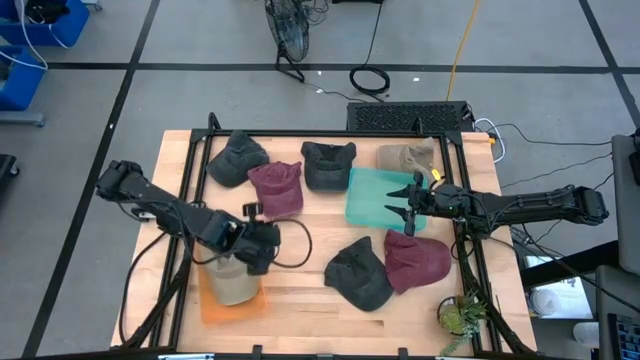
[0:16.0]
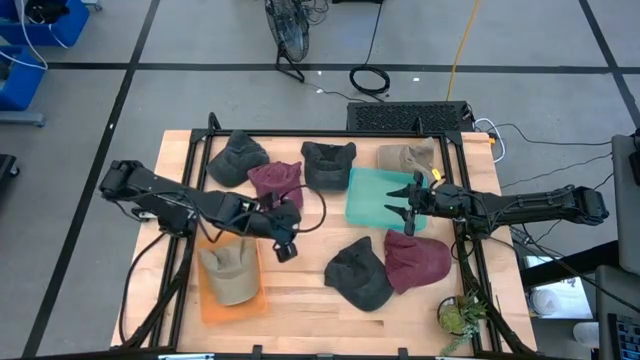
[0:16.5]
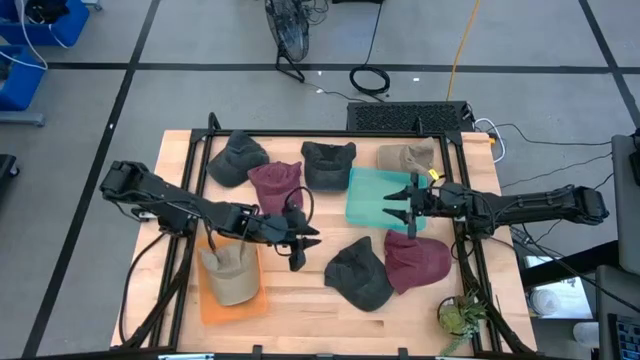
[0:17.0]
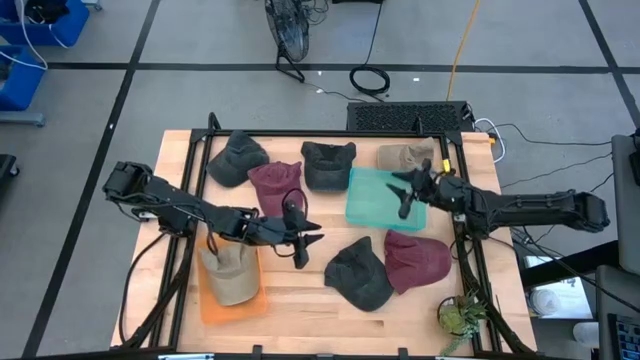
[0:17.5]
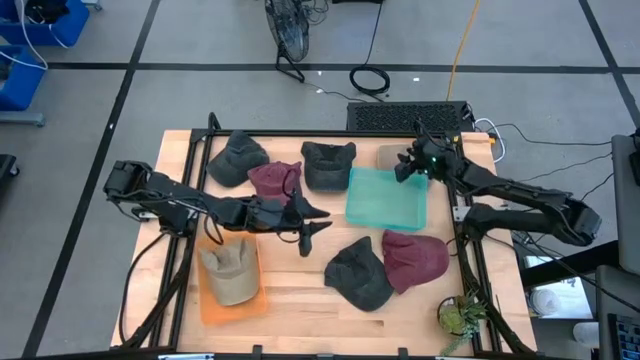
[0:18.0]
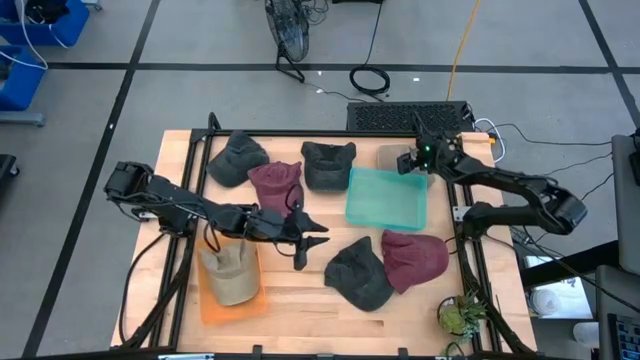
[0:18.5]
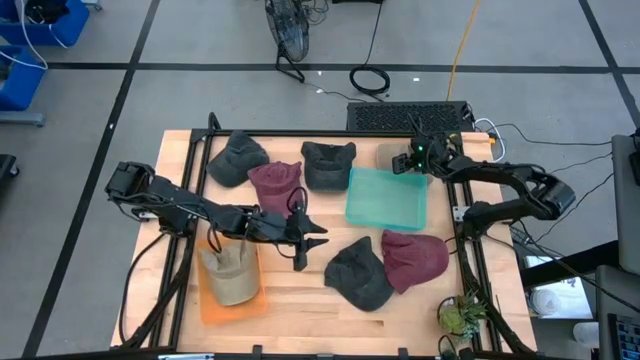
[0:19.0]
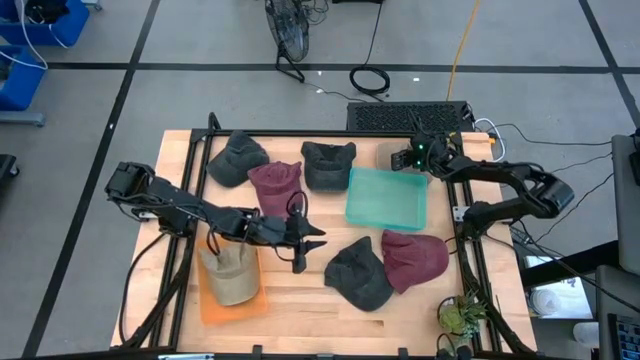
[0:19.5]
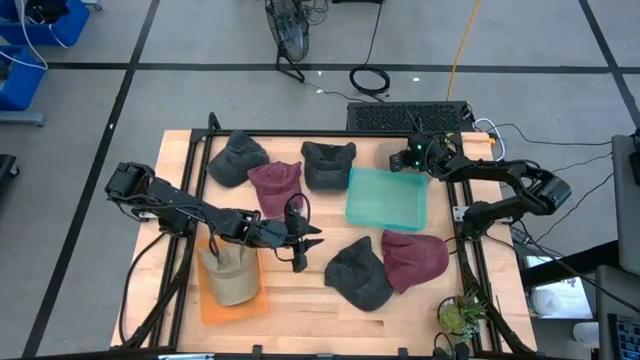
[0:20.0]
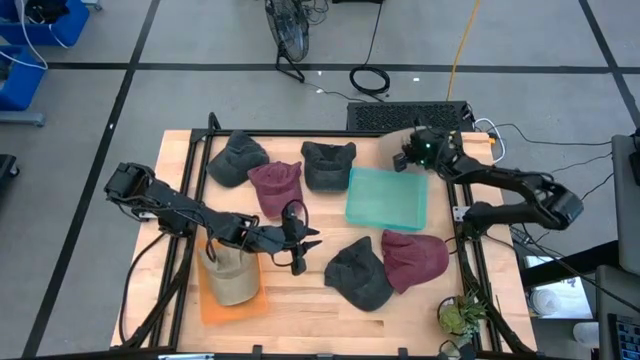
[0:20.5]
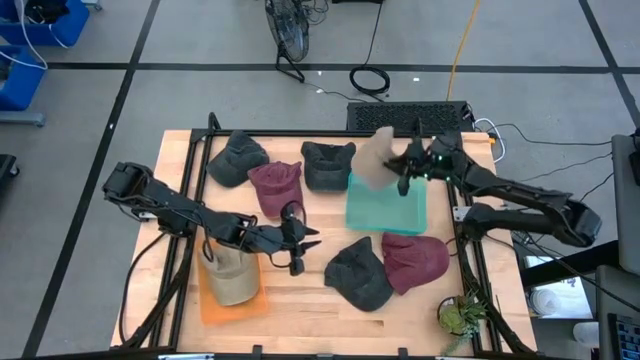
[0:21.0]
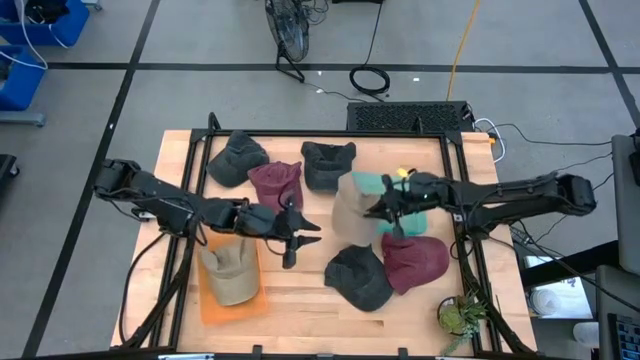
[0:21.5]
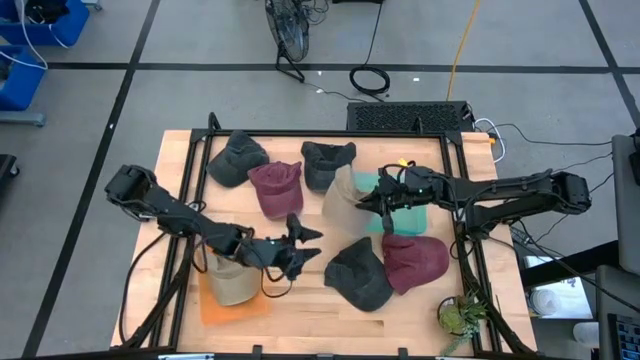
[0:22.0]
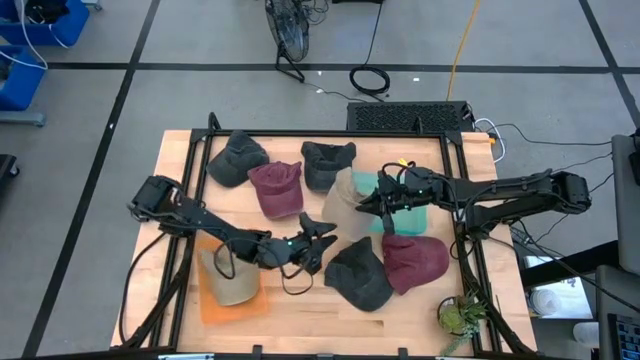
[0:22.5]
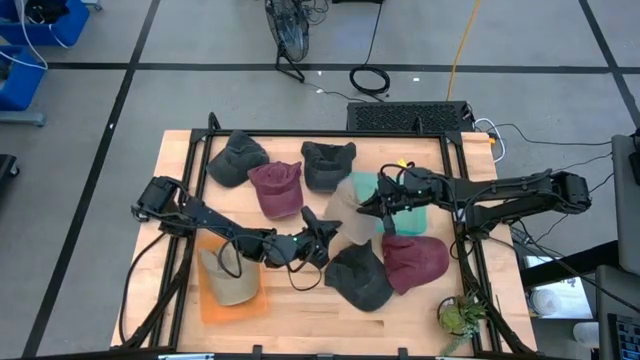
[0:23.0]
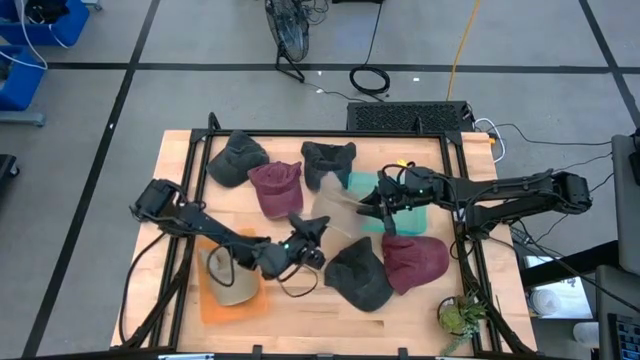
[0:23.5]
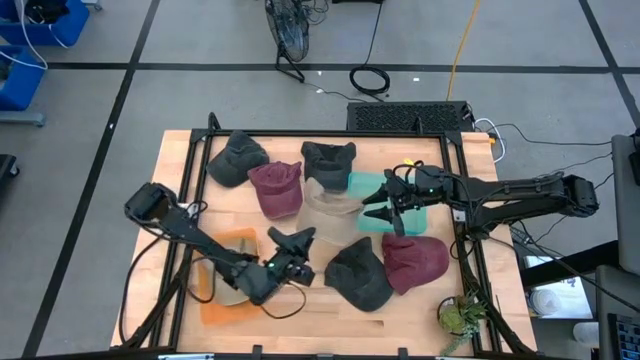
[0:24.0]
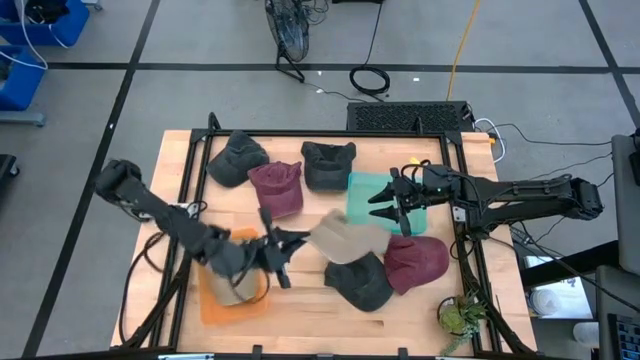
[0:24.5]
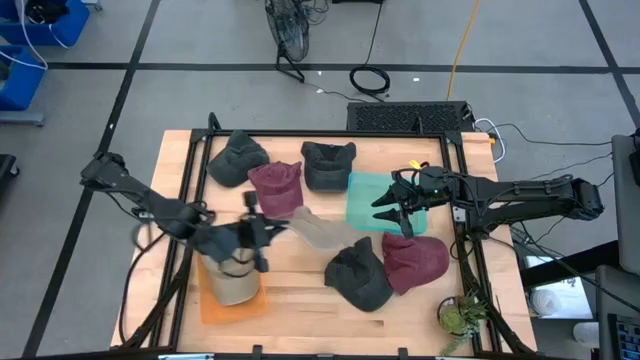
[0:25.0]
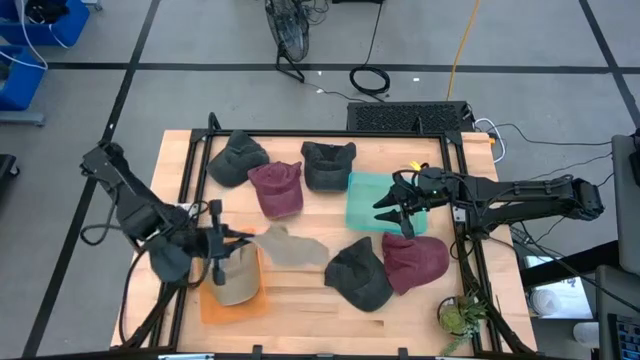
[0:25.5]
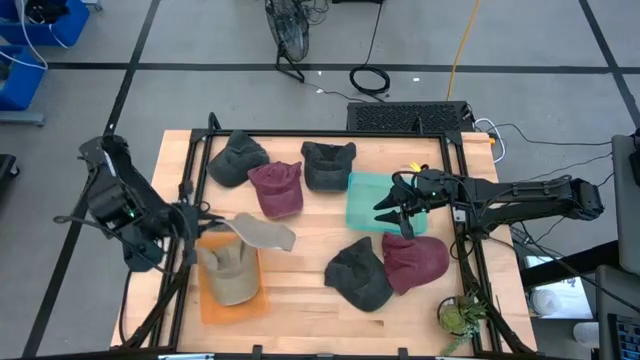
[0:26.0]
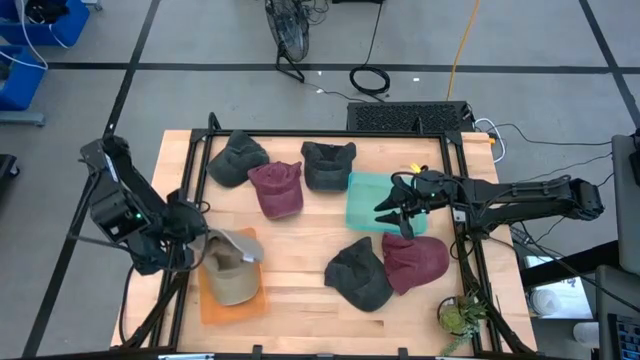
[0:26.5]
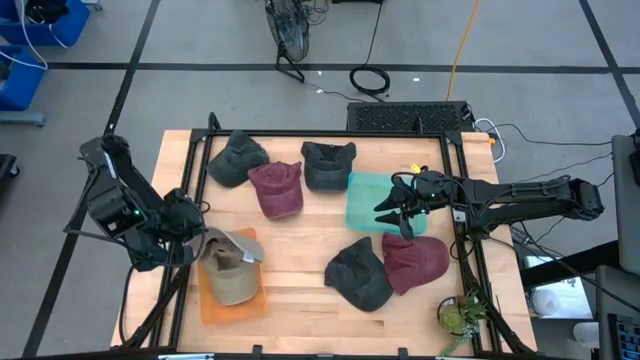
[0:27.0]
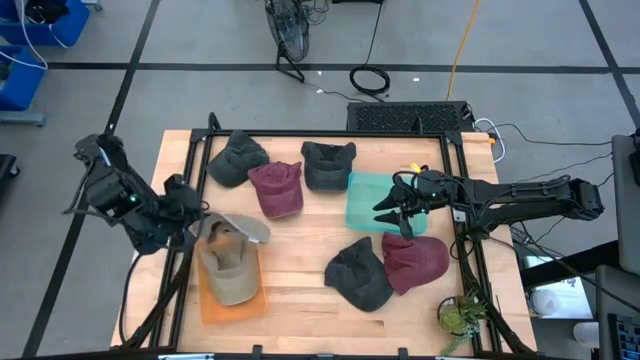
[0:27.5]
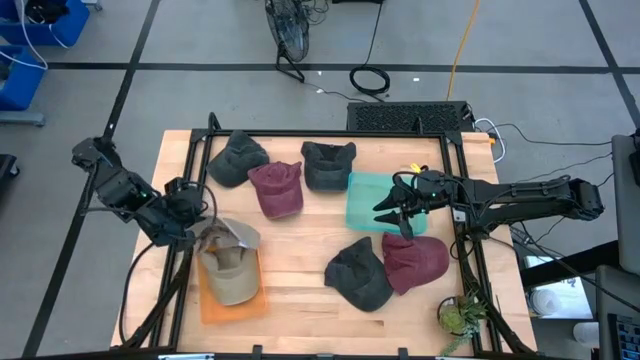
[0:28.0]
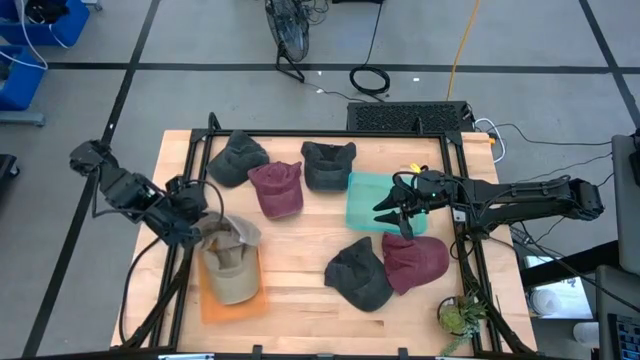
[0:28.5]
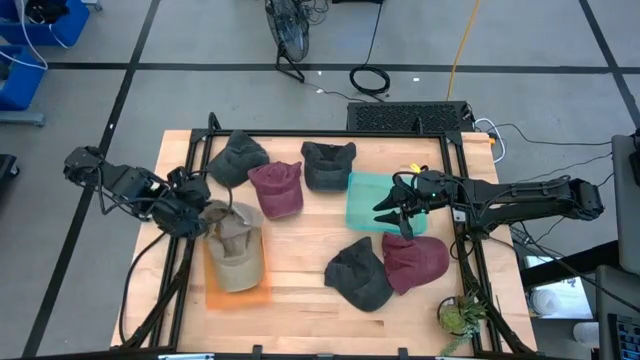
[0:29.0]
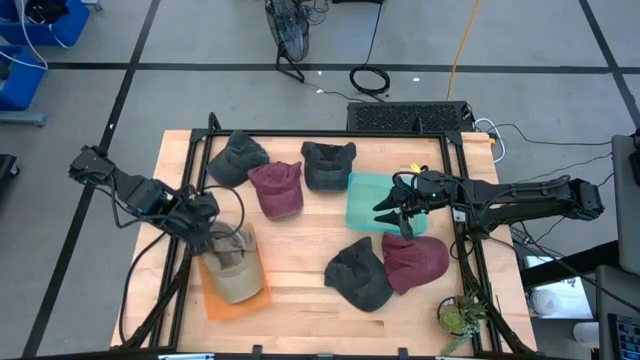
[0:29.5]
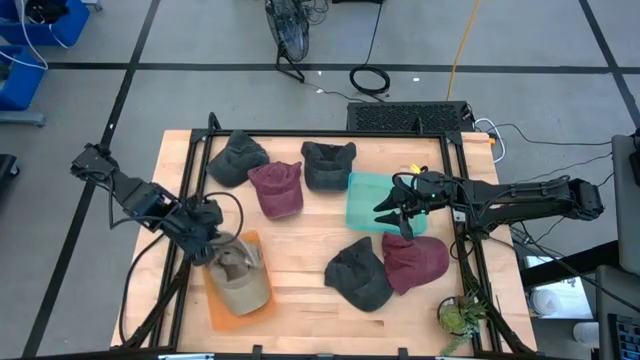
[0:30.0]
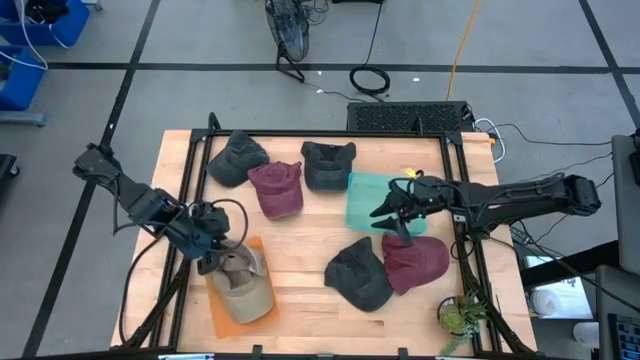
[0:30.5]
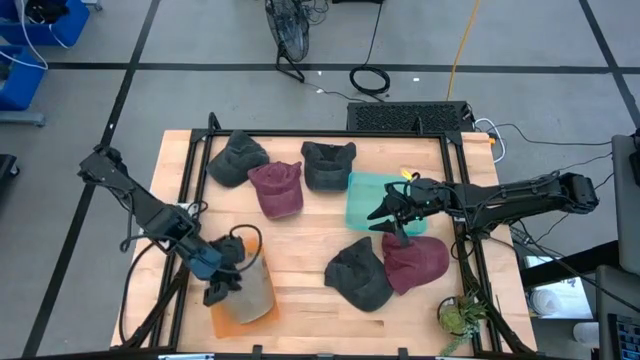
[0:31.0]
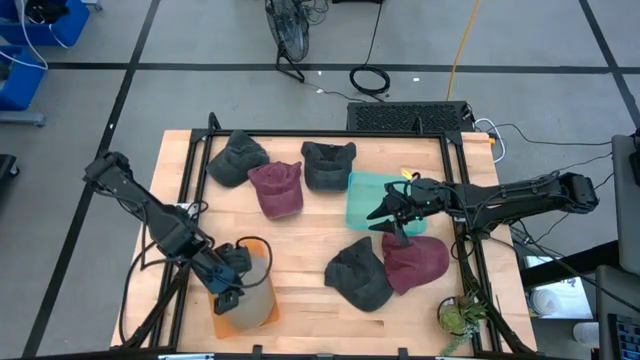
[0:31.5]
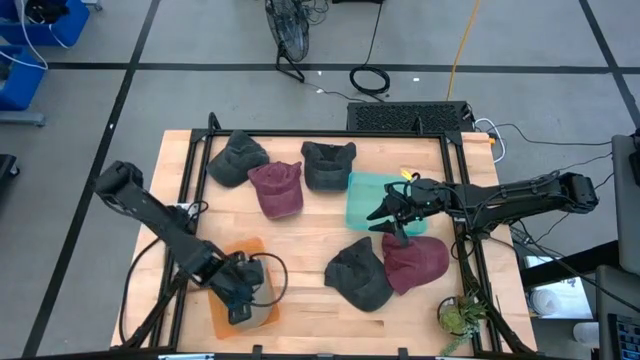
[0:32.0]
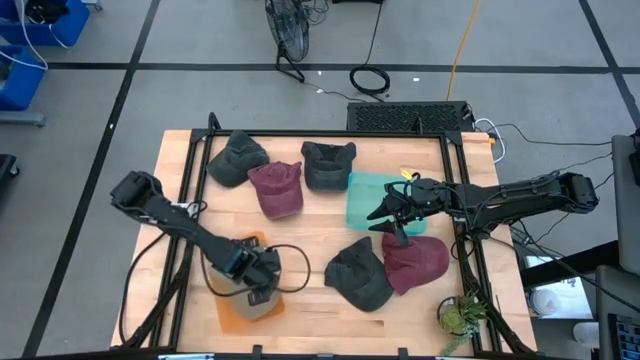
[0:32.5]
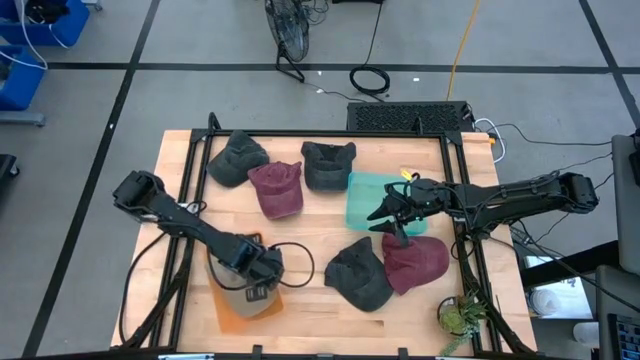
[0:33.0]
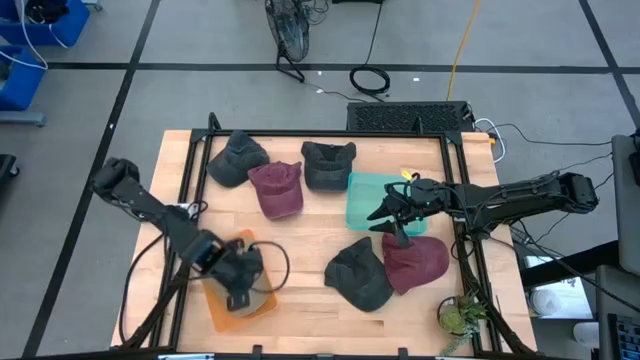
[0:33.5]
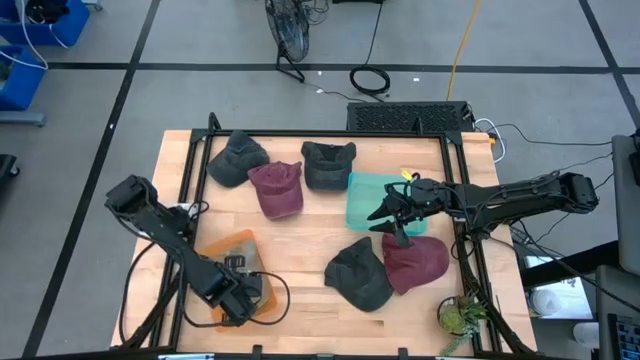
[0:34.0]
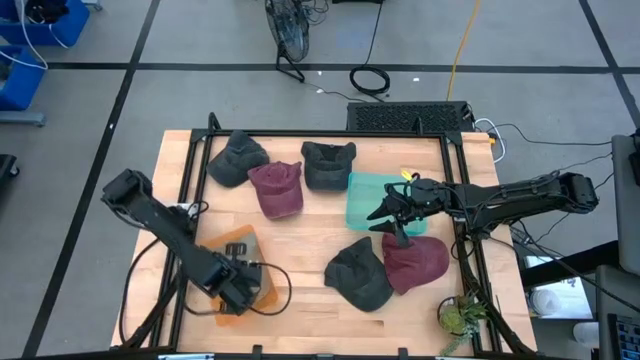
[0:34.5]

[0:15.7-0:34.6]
Task: Pick & Place hat
Put the brown cap into the orange bin
